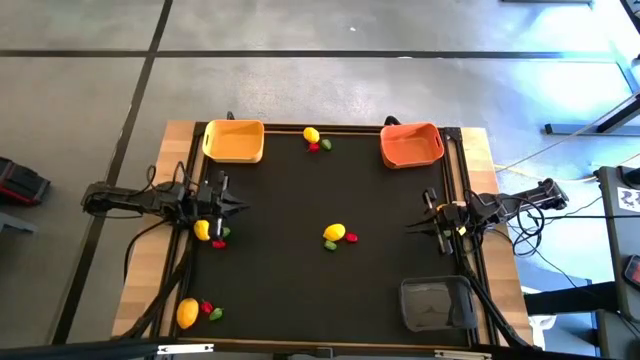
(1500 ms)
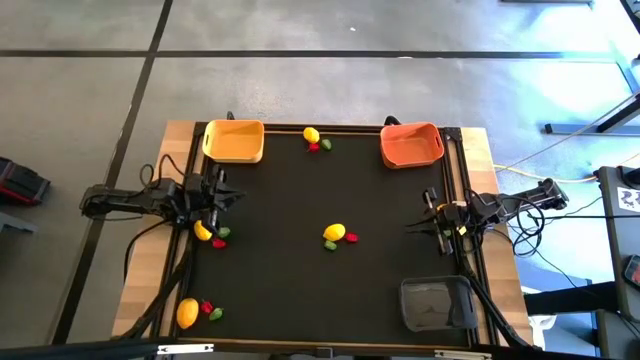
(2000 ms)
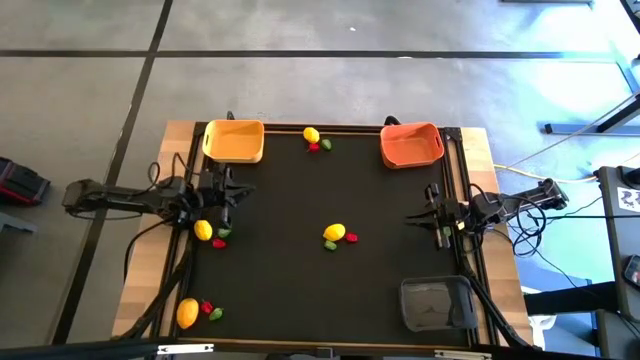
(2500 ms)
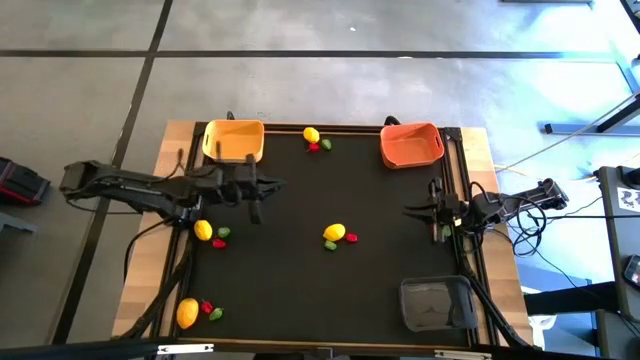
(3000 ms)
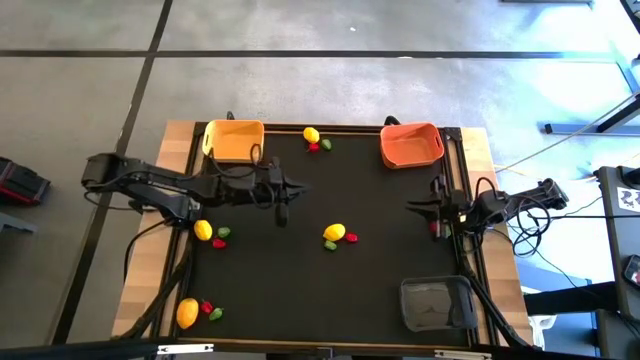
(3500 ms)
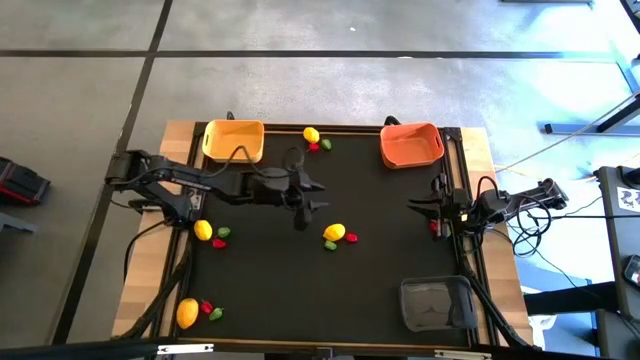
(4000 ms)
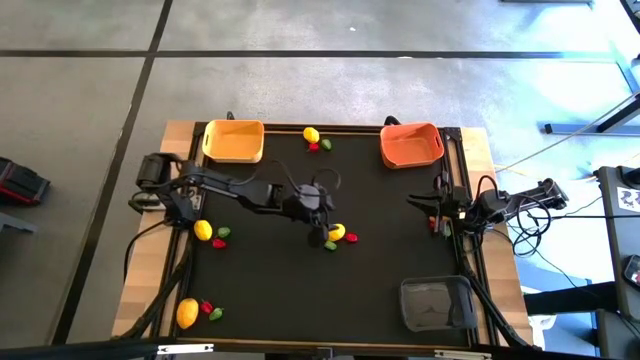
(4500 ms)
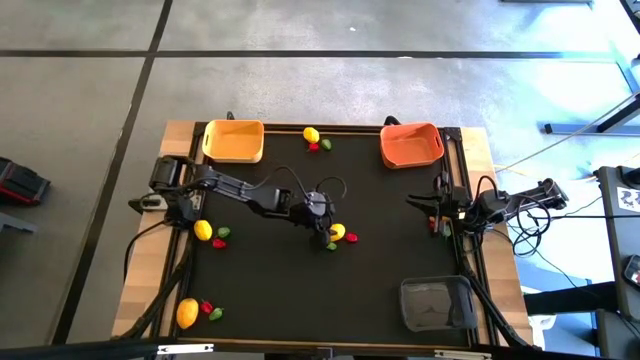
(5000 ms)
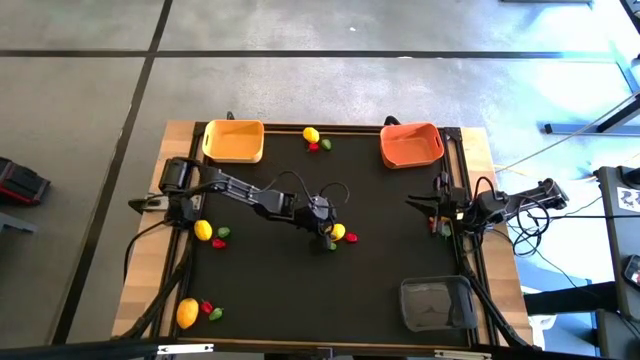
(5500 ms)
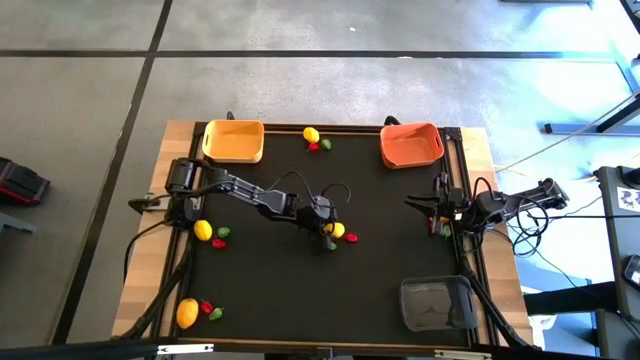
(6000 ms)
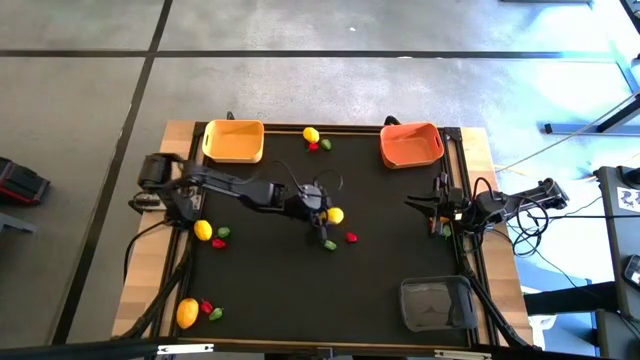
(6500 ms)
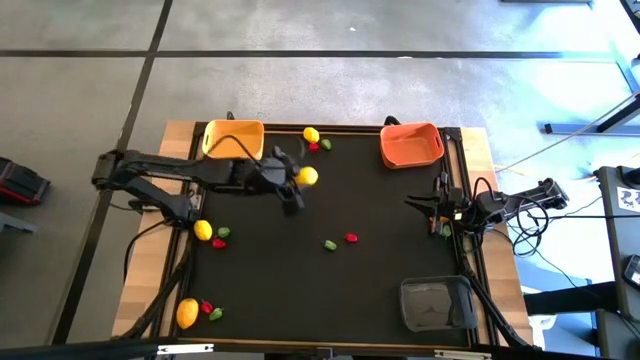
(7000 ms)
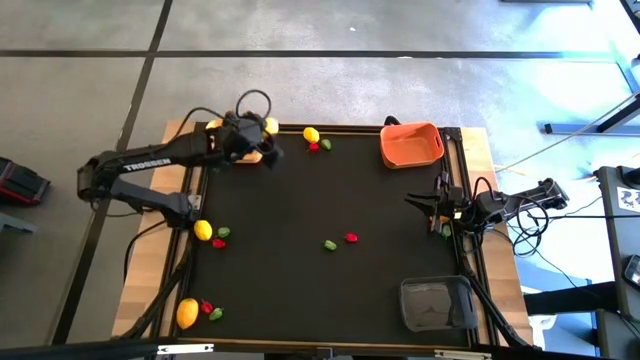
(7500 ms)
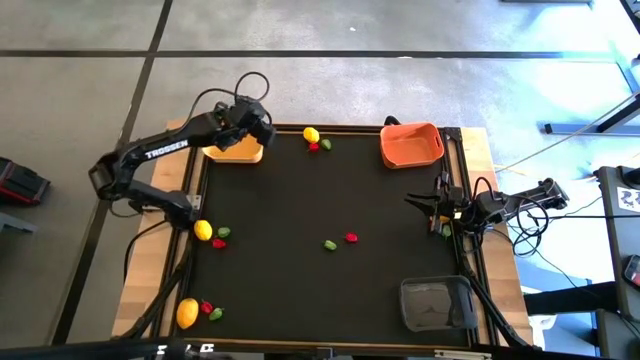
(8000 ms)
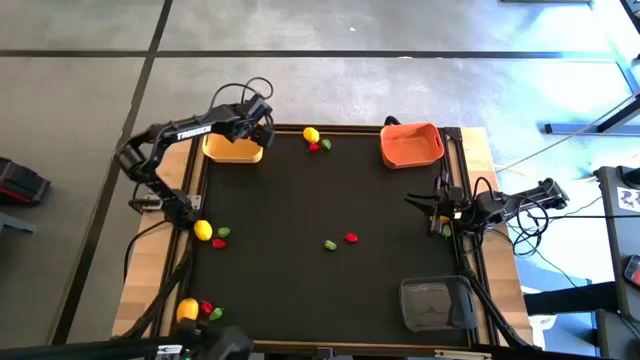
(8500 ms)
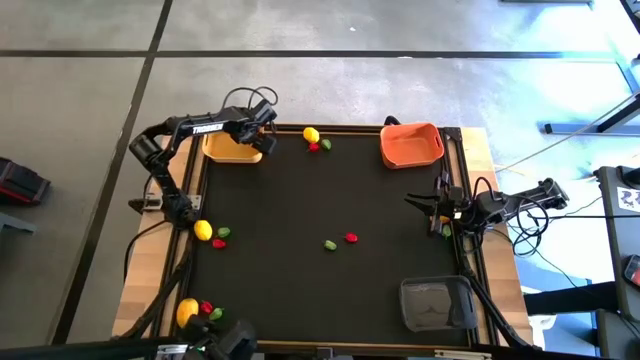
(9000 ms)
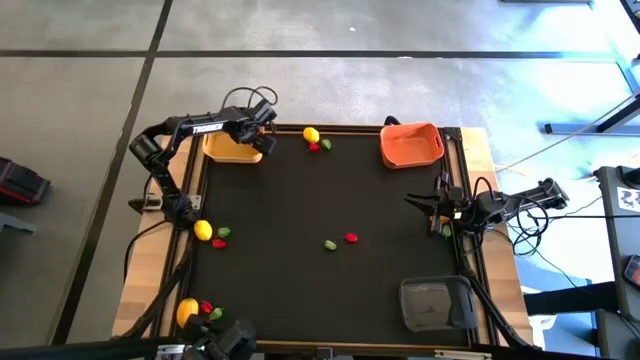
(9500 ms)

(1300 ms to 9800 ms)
Task: Sort produce into baskets
Put the lemon into the yellow bin

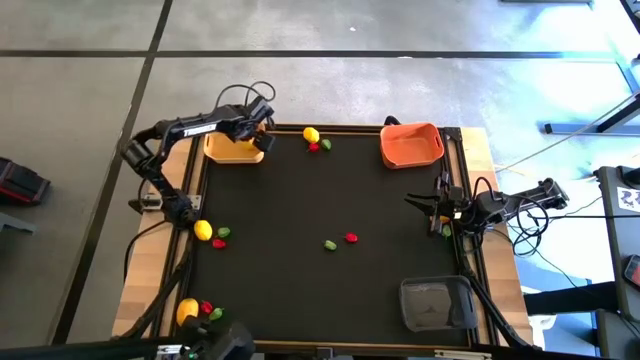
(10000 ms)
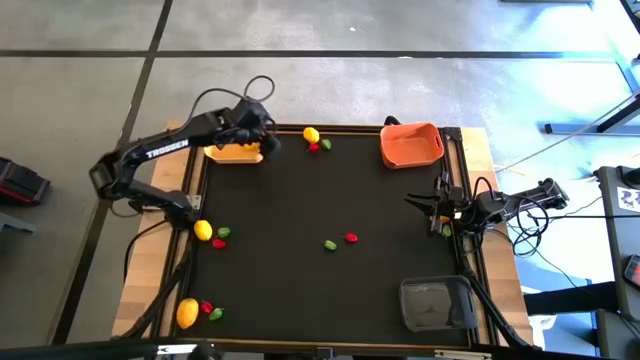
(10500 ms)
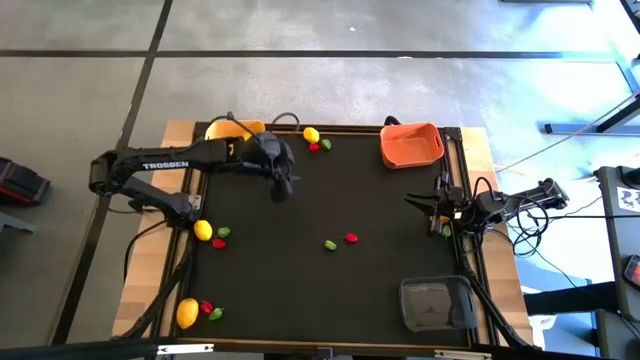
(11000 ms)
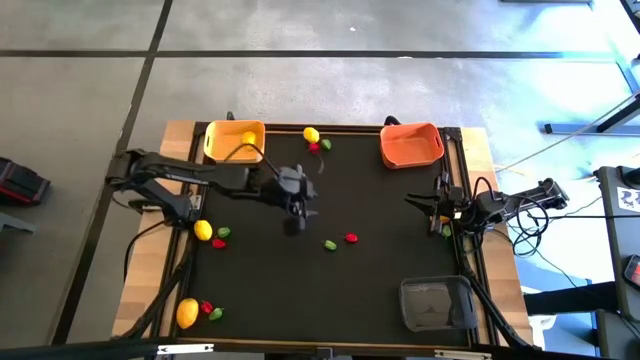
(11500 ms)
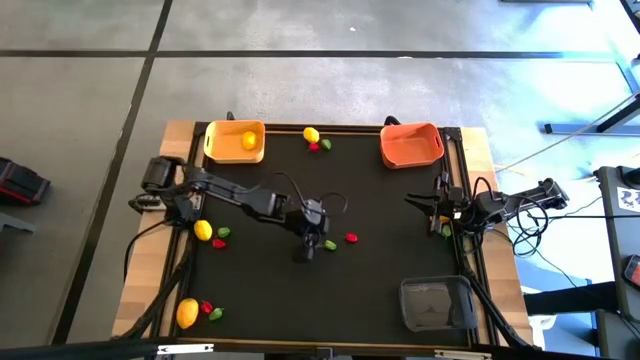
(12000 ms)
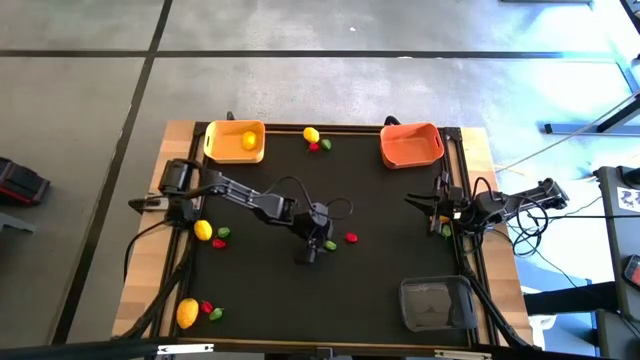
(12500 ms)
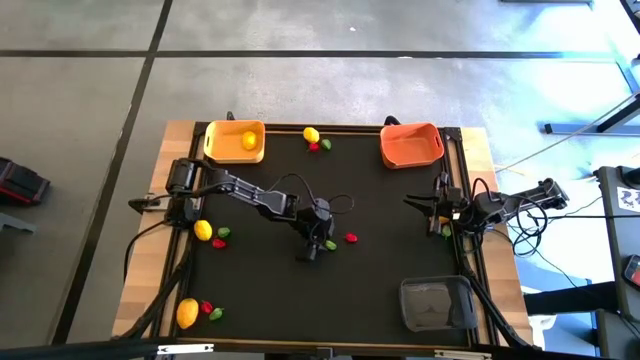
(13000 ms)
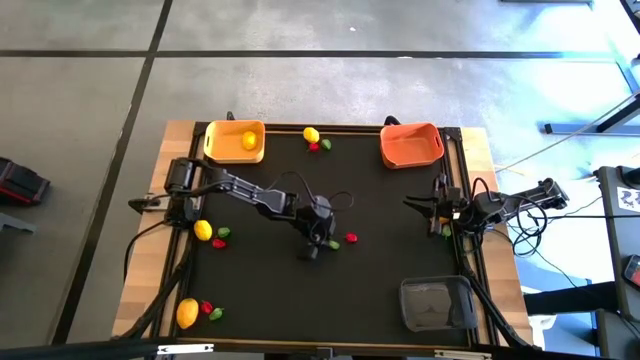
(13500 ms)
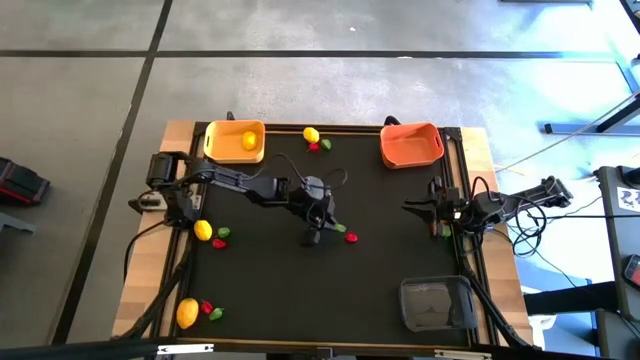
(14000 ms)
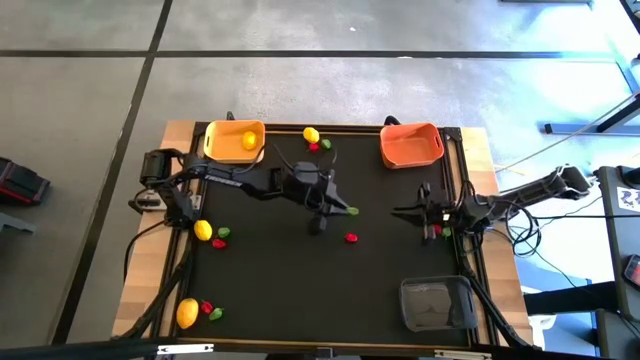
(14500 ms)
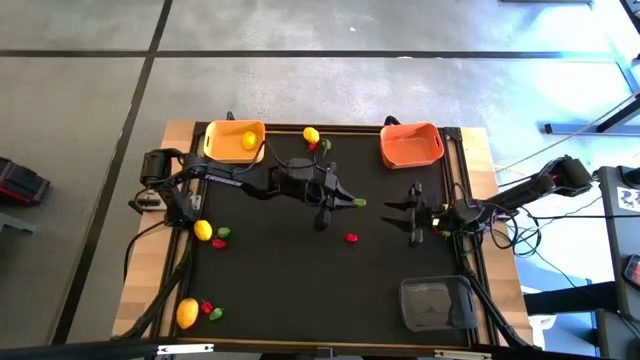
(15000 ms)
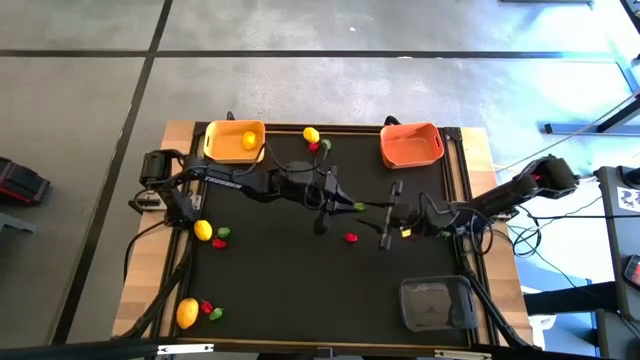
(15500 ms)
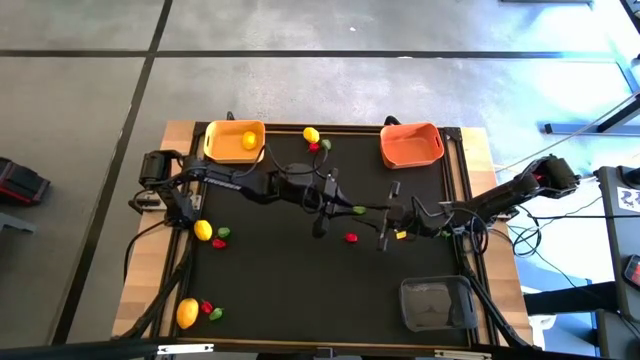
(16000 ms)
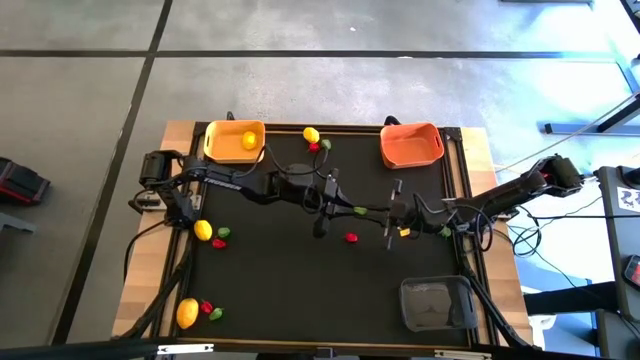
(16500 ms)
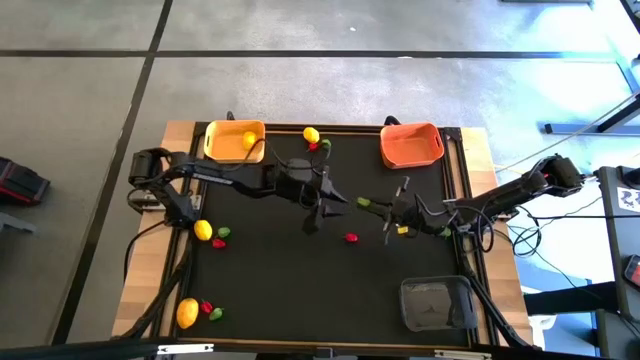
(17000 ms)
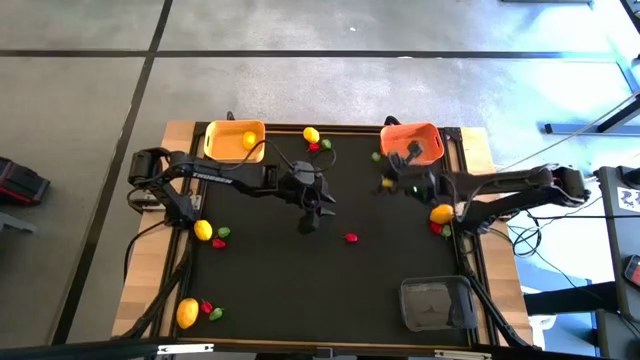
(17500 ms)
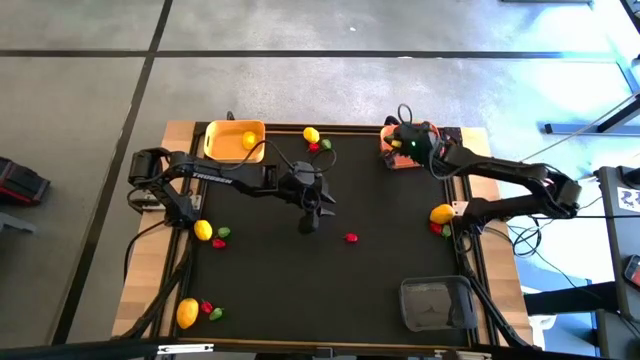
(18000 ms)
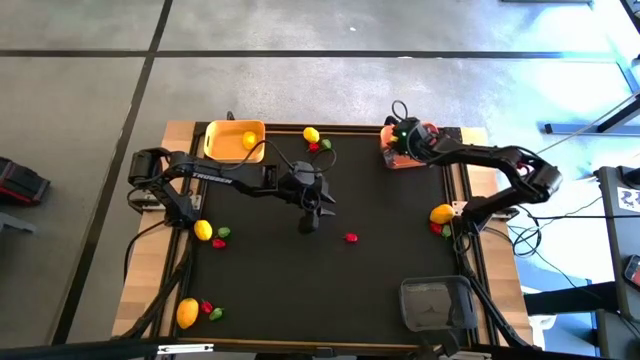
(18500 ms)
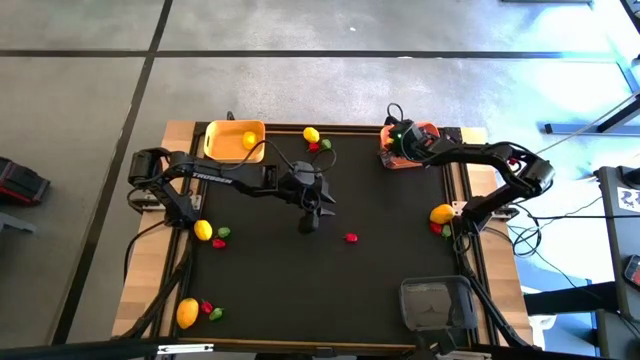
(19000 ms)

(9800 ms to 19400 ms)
Put the green chili pepper into the orange bin

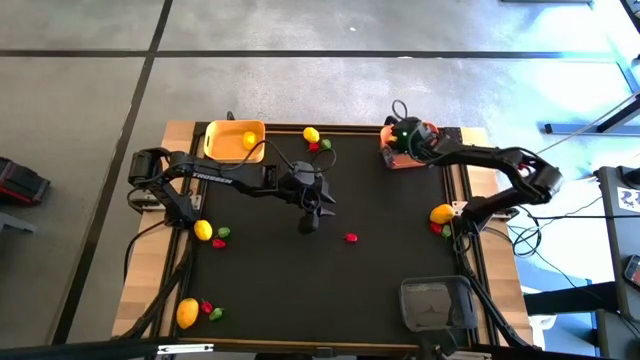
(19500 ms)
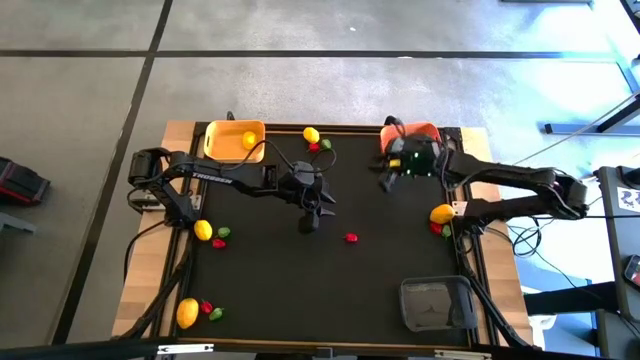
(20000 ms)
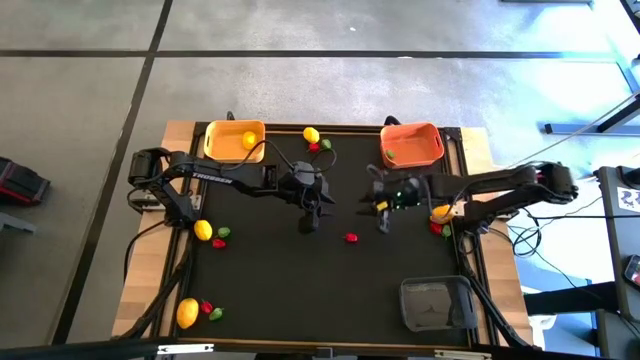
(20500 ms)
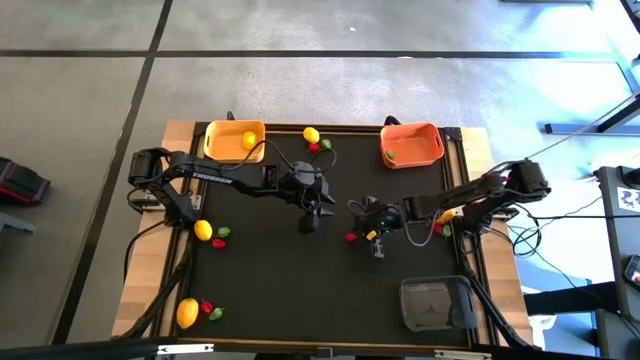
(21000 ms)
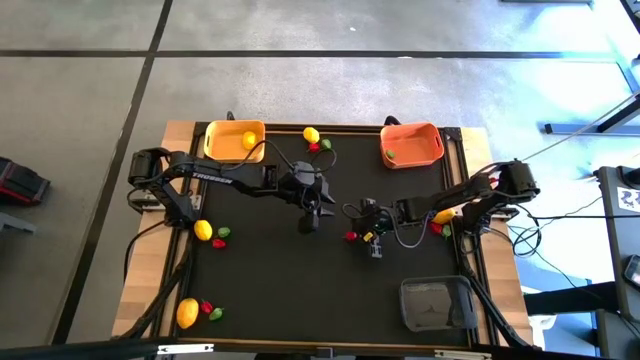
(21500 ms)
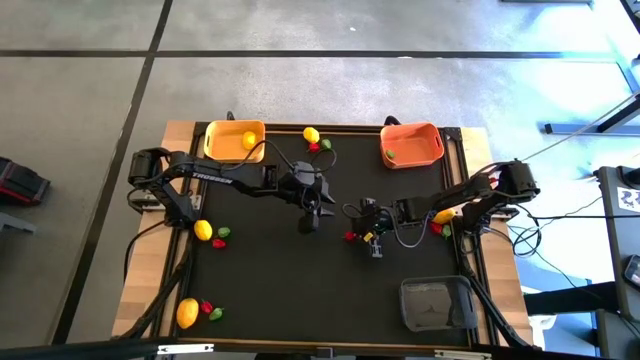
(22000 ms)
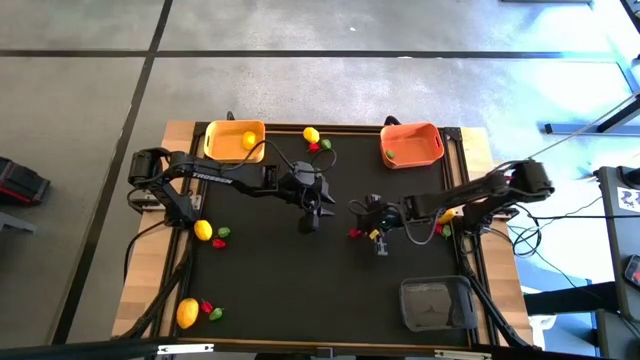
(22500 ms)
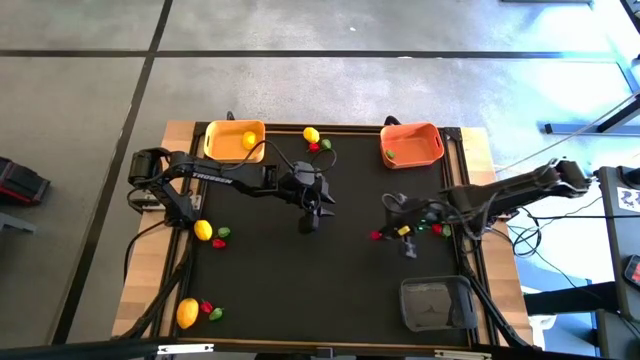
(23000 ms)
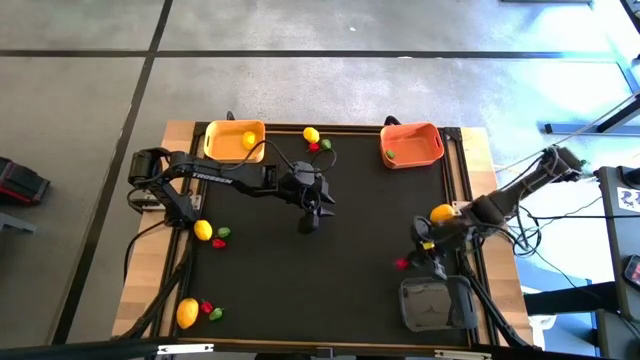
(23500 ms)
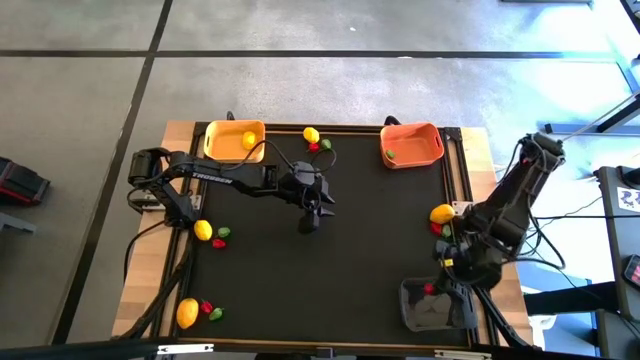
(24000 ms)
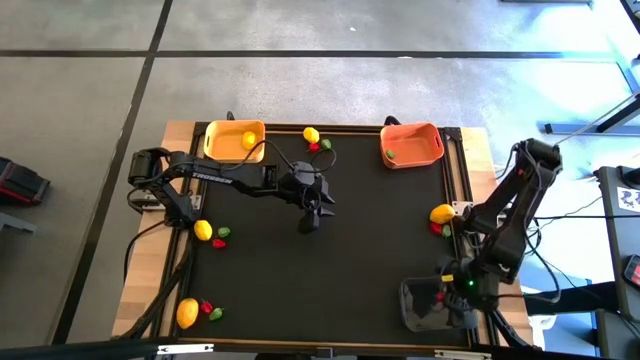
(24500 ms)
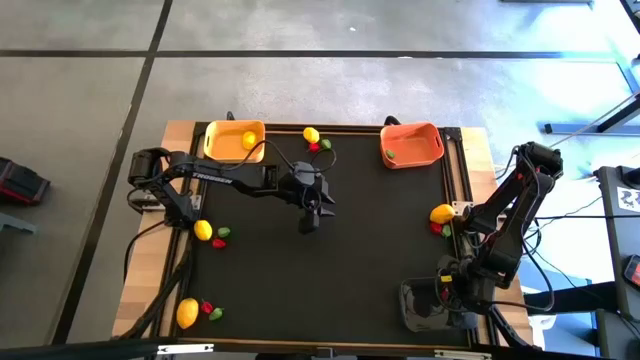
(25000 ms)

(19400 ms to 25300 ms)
Put the red chili pepper into the gray bin
